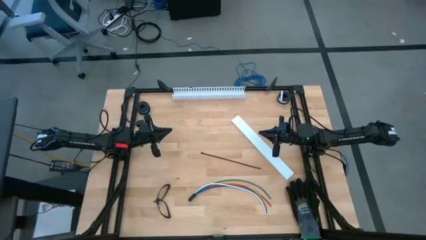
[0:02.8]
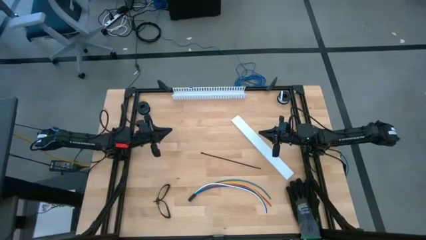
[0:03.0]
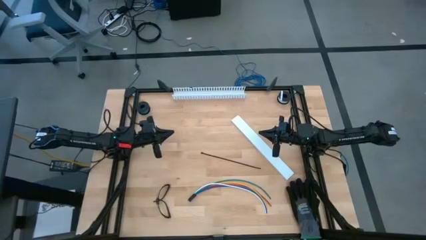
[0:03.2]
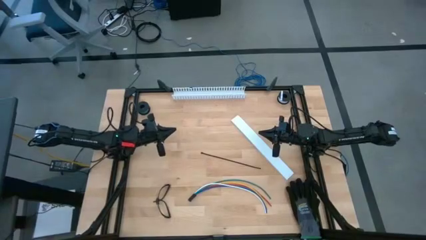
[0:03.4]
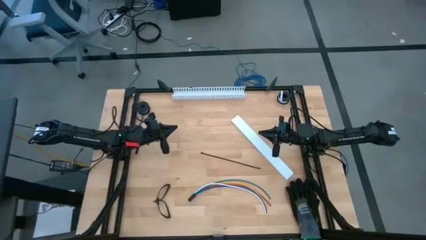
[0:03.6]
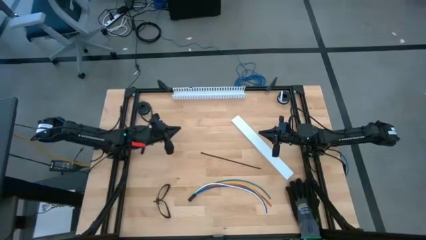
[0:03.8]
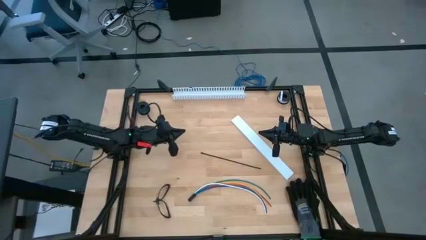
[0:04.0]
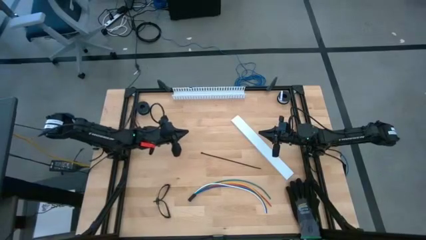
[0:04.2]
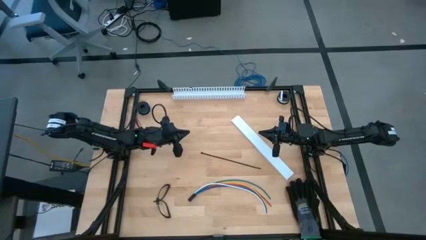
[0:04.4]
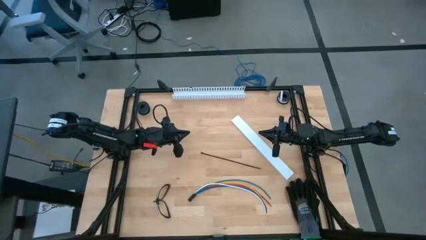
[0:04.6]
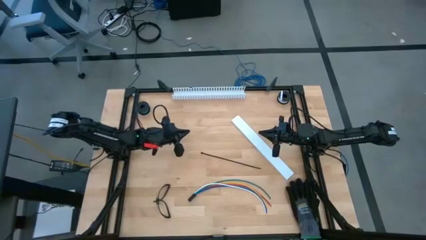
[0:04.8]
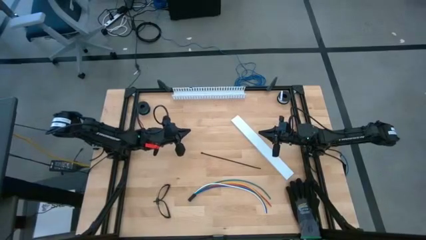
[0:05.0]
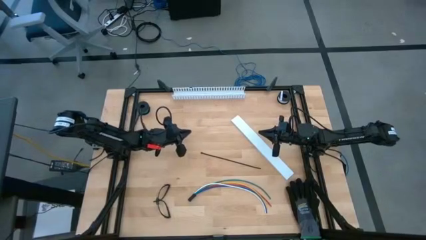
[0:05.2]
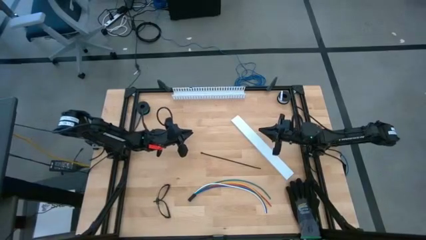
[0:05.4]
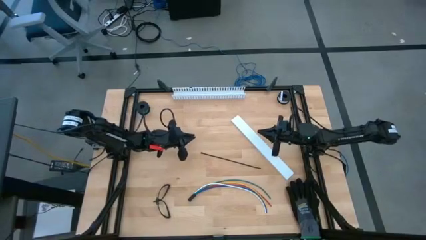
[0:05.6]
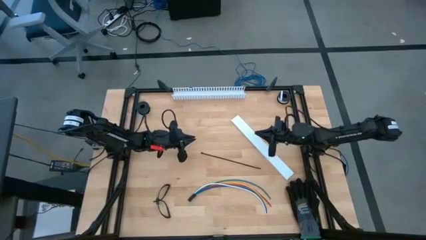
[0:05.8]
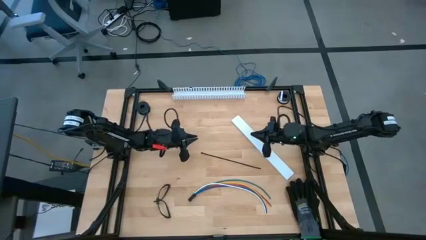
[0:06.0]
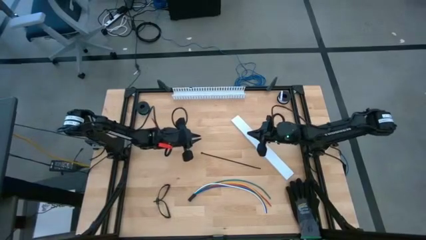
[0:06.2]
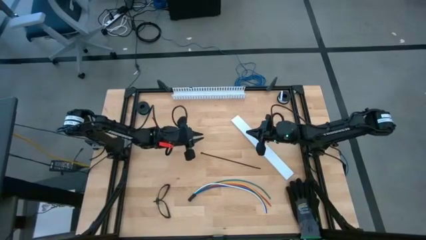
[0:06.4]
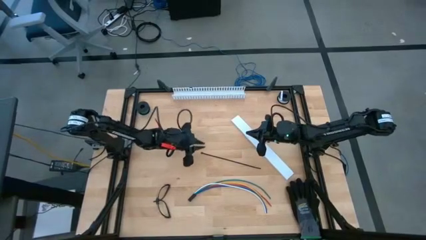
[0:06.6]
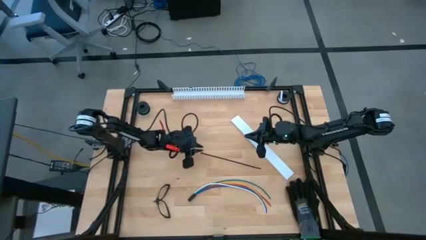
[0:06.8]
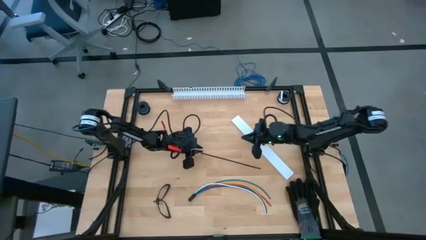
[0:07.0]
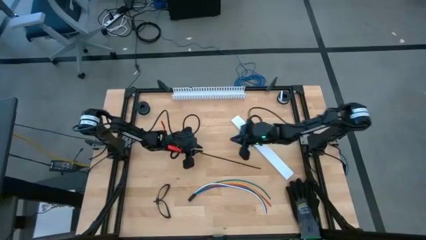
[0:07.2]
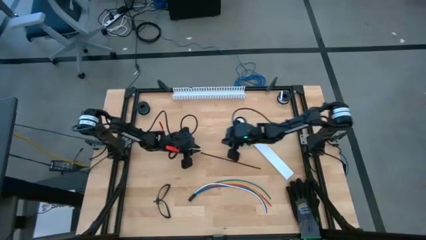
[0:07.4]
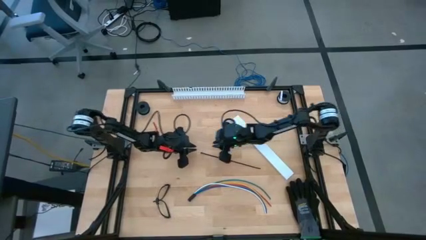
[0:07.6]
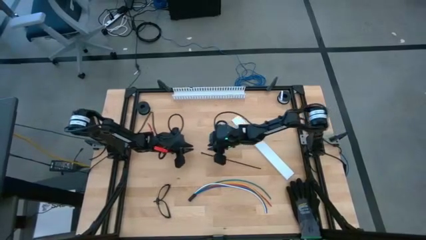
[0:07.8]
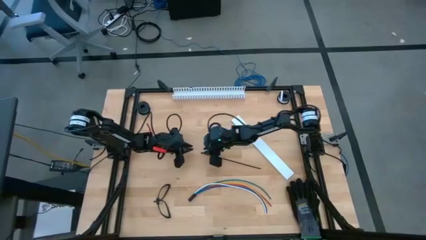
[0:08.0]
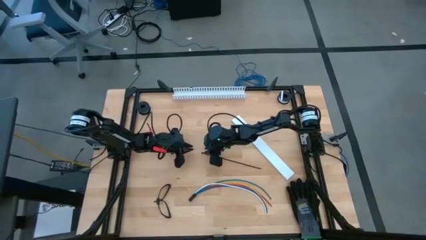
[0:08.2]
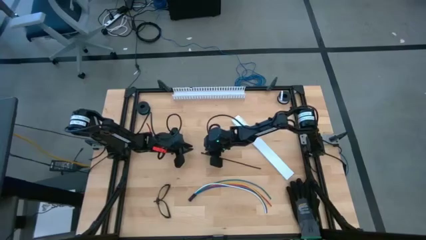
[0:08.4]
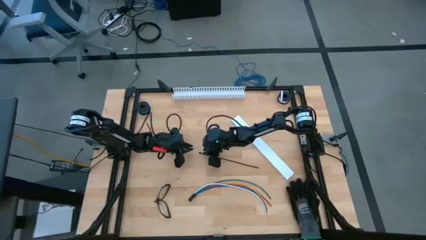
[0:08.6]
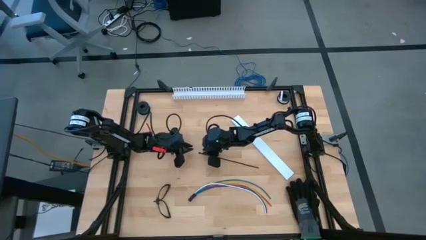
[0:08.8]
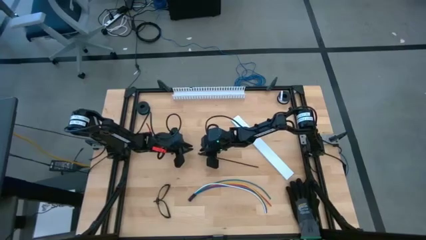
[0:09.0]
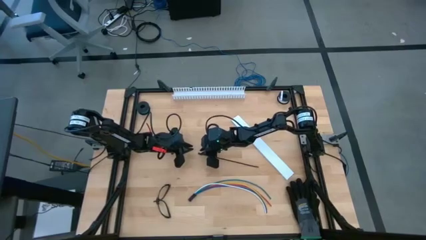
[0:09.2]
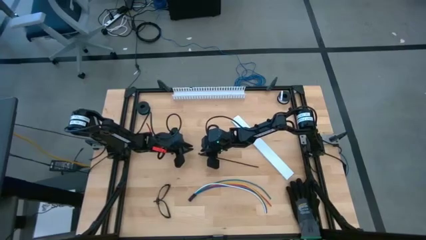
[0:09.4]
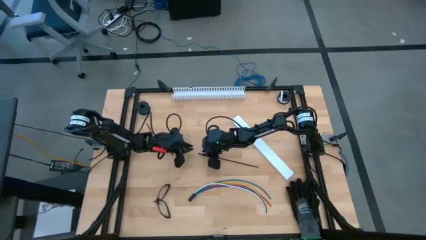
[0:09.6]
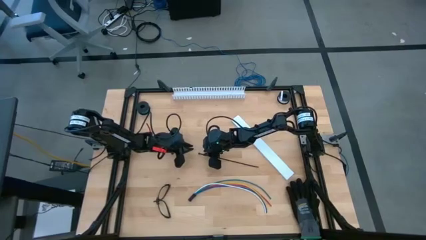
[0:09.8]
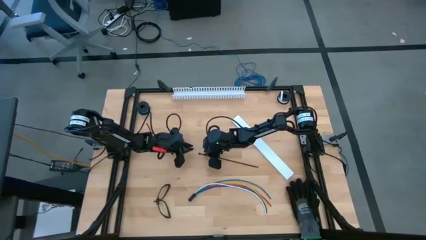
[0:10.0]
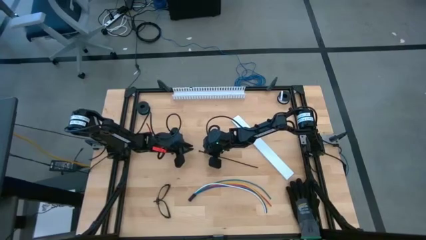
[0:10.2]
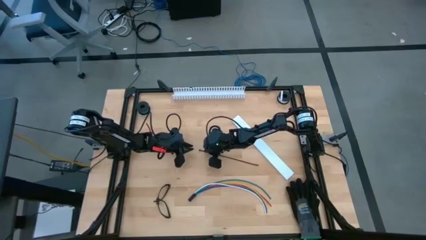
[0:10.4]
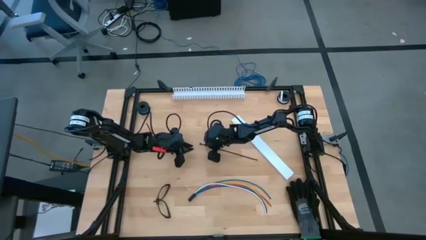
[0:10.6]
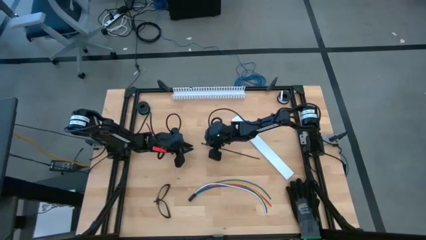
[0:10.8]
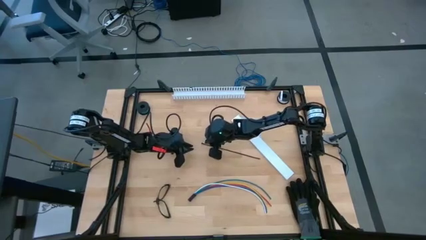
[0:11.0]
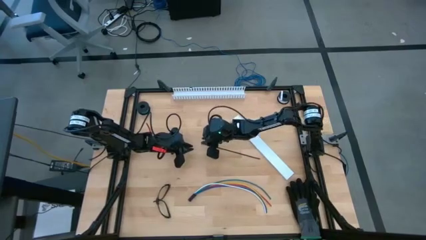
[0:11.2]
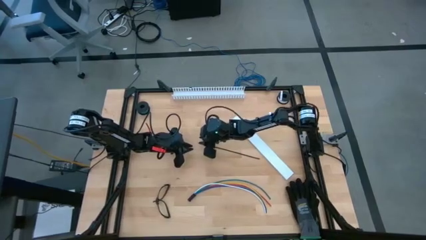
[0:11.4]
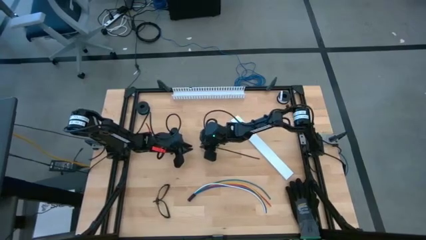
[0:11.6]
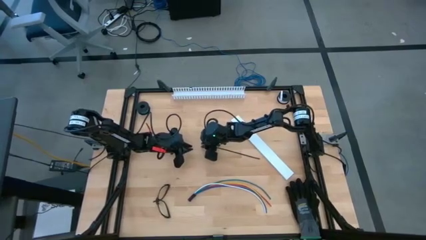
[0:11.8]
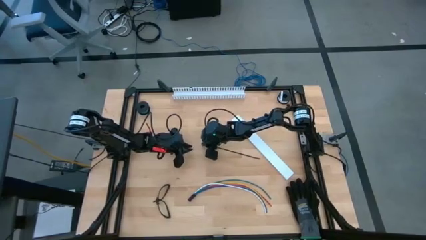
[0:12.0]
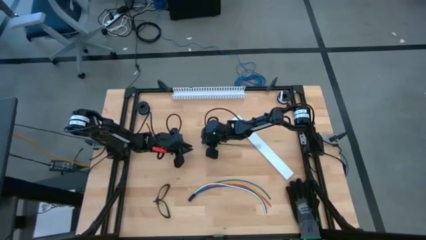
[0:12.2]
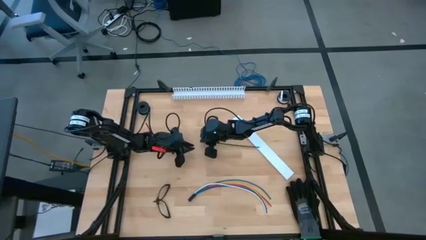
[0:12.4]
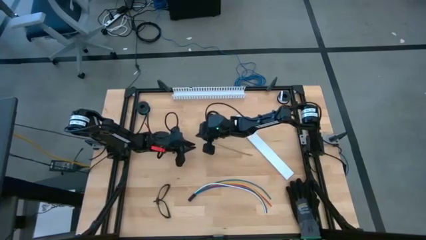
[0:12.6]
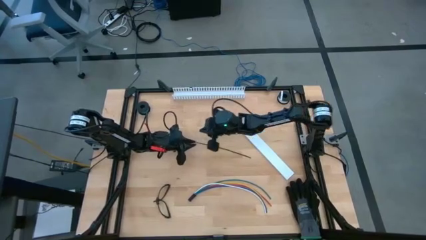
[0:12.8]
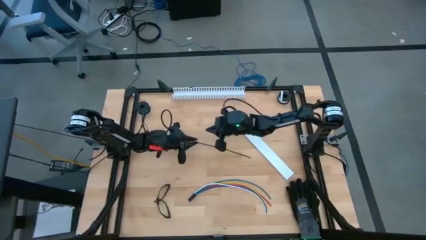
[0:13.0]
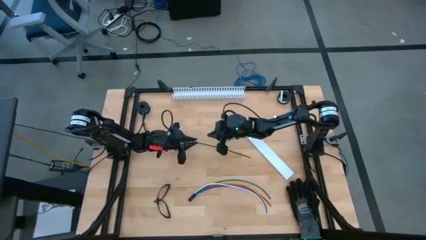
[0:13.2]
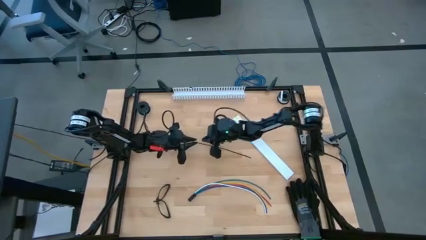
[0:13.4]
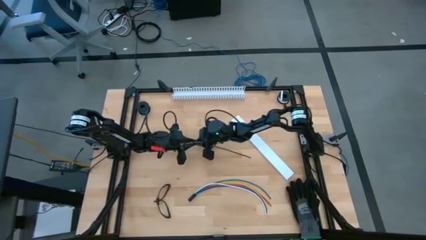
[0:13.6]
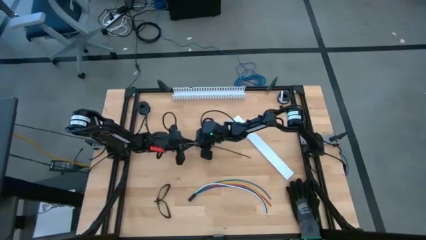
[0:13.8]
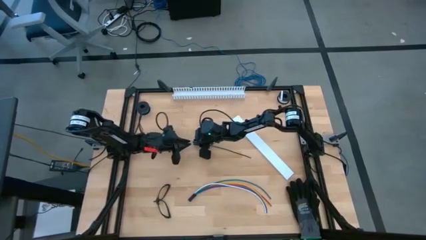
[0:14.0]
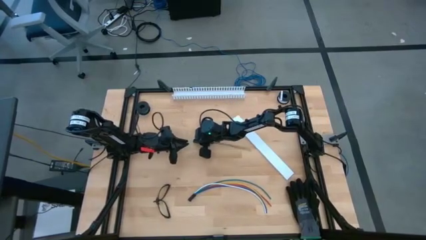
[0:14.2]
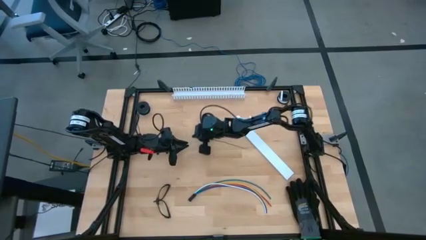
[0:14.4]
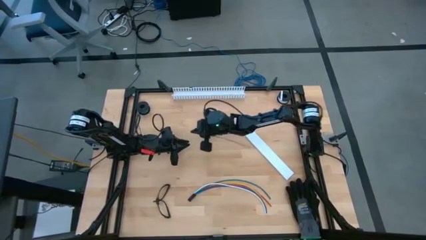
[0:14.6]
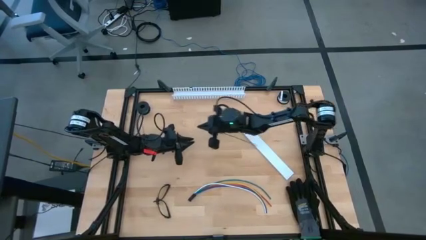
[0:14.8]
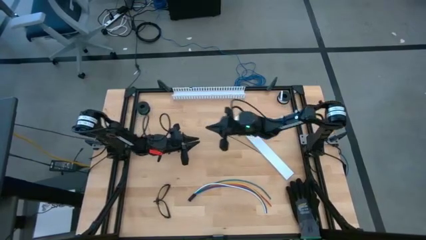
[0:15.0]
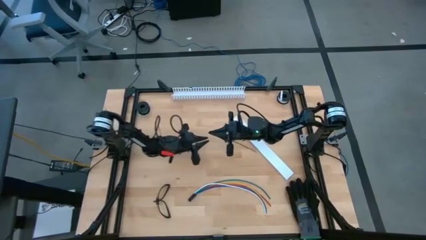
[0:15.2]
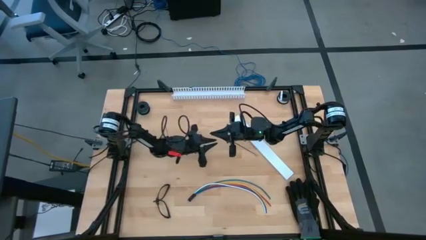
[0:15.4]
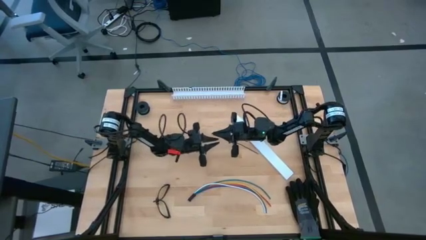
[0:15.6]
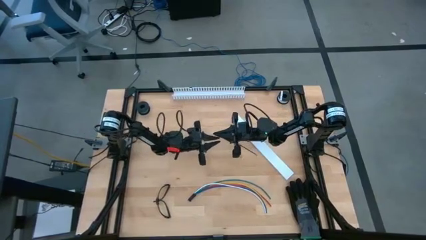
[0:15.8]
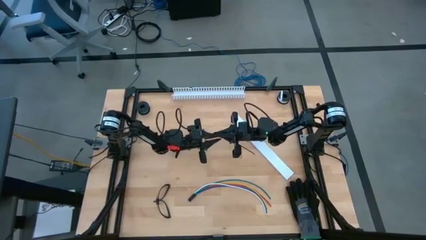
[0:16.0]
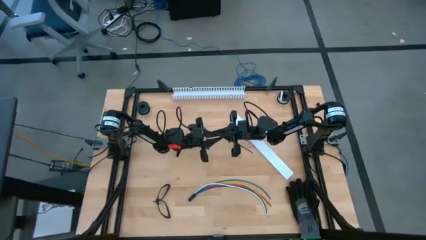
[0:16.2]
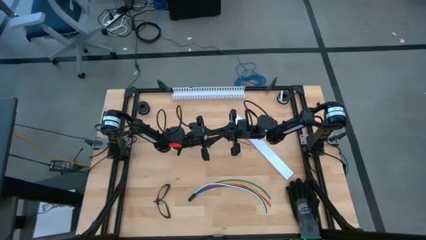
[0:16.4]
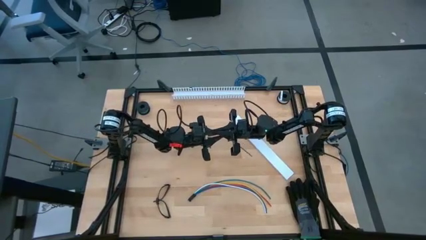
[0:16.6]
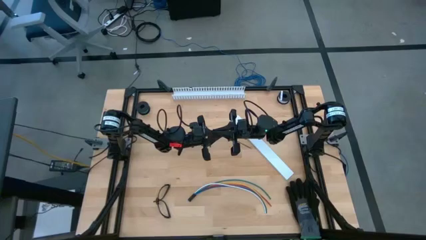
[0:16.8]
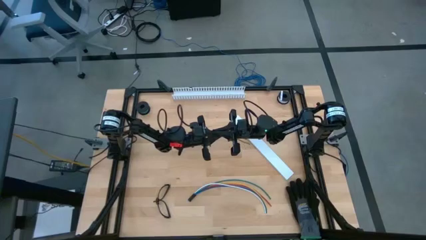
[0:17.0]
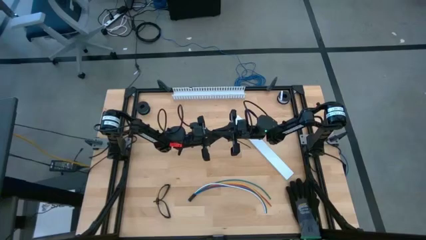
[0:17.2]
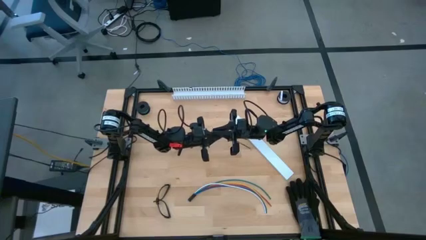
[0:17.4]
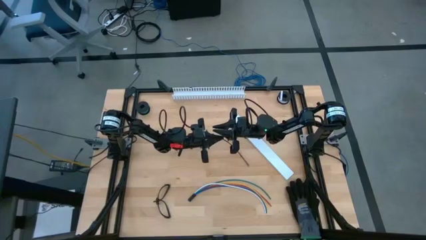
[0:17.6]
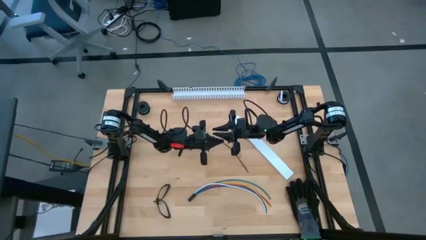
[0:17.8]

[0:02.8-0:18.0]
Task: Ziptie cables
Wrap the zip tie around the cable wires
